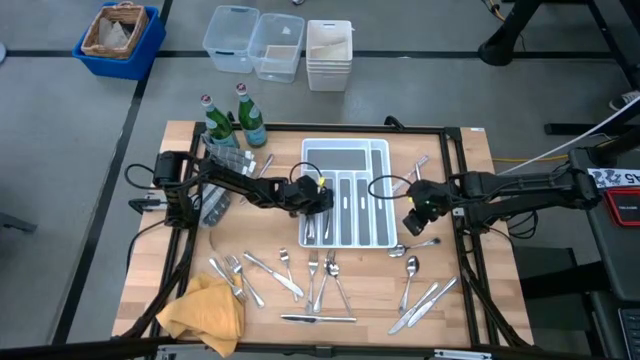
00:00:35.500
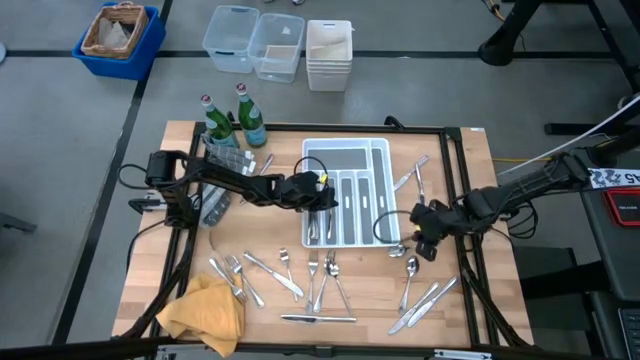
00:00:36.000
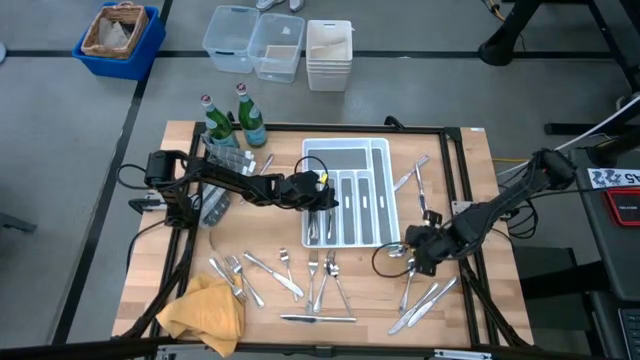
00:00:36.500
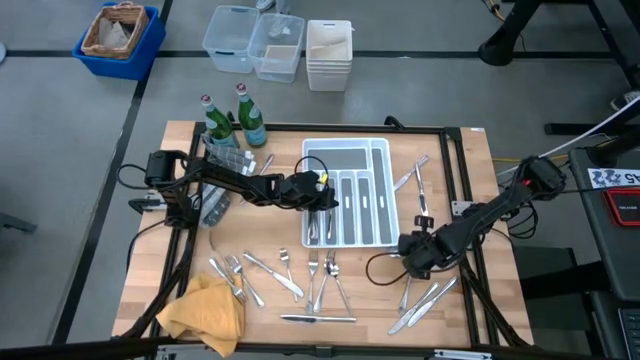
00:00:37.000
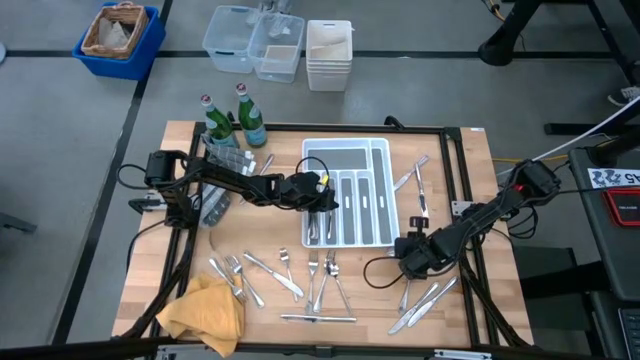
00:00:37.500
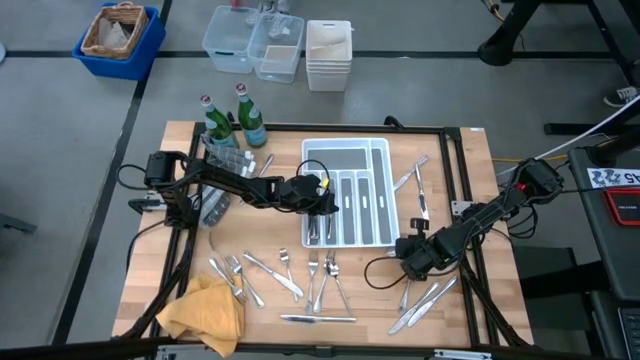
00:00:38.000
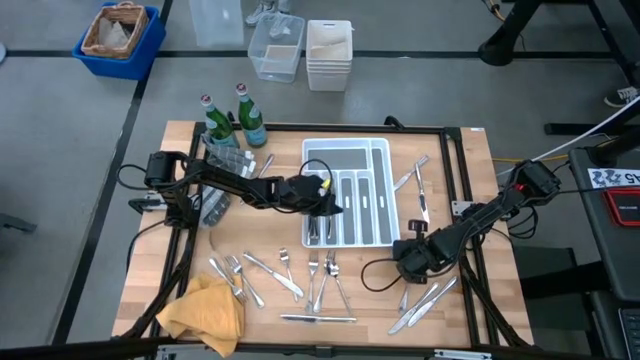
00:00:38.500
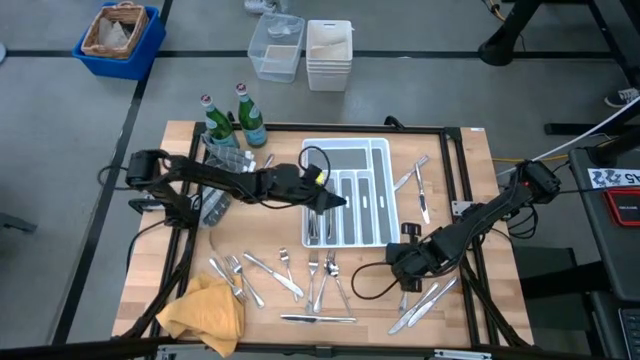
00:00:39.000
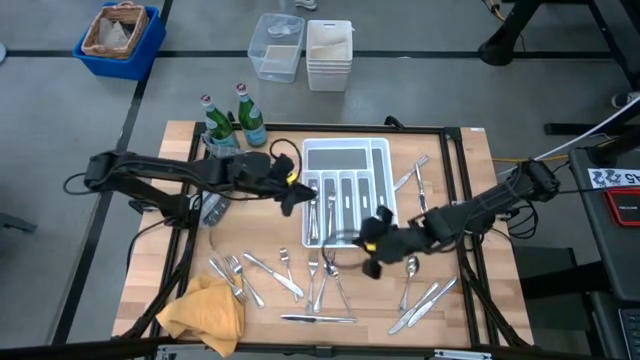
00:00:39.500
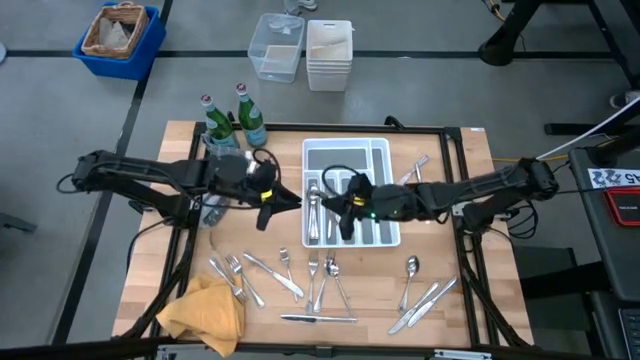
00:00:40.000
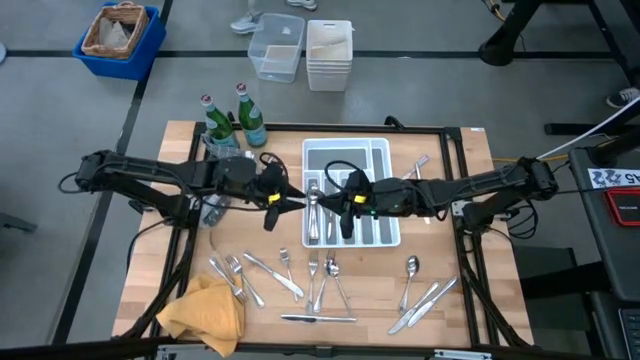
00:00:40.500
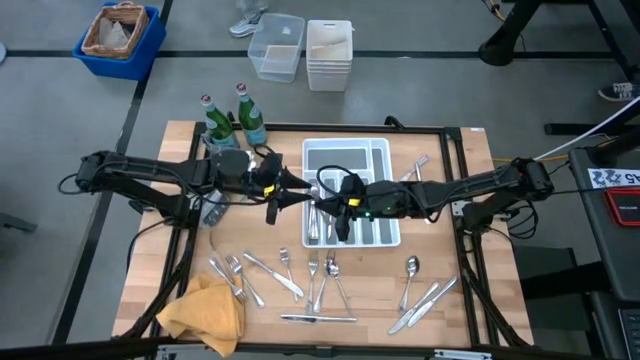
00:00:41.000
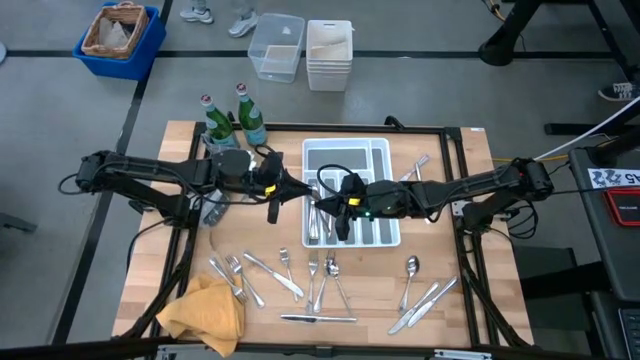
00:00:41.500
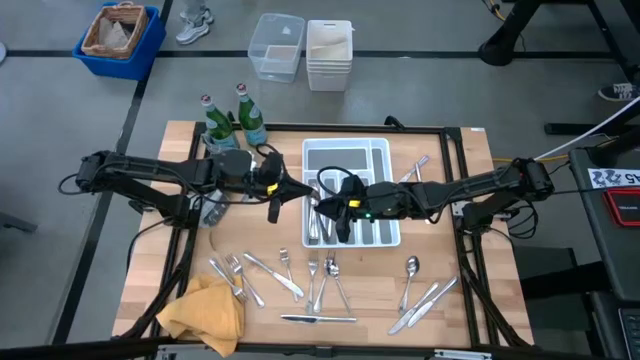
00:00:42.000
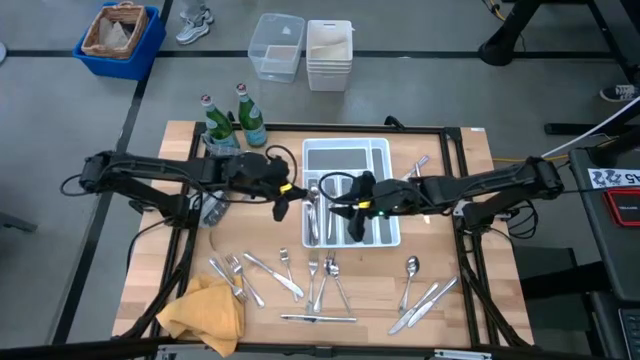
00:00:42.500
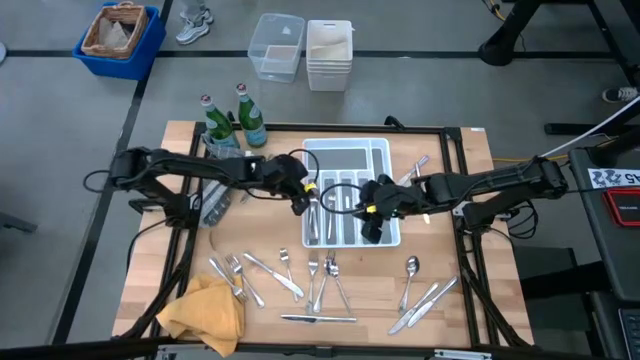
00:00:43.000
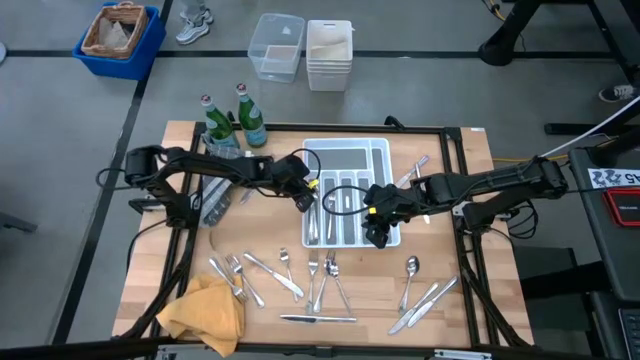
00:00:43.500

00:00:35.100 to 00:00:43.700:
Task: Sort silverware
Put the silver spoon into the silverware tray

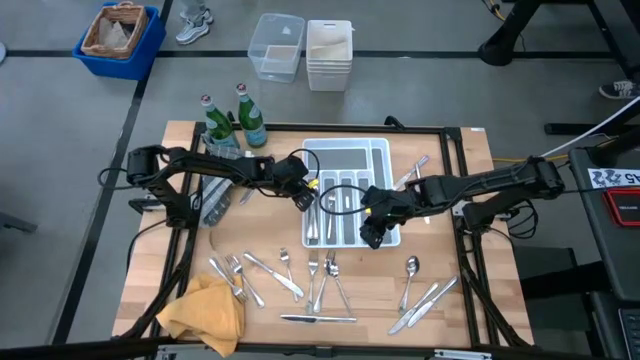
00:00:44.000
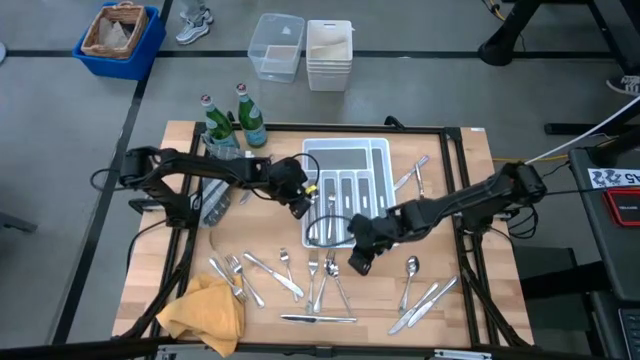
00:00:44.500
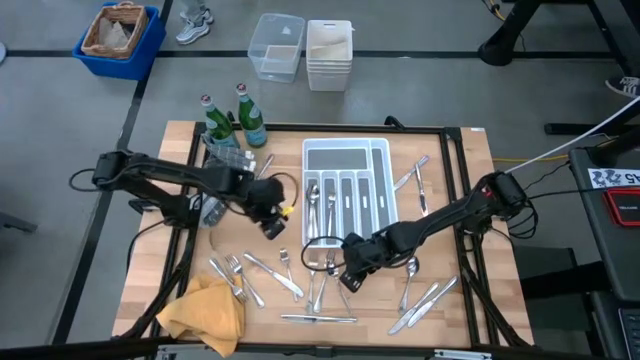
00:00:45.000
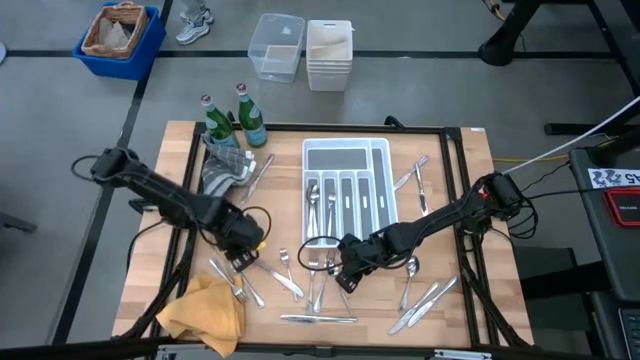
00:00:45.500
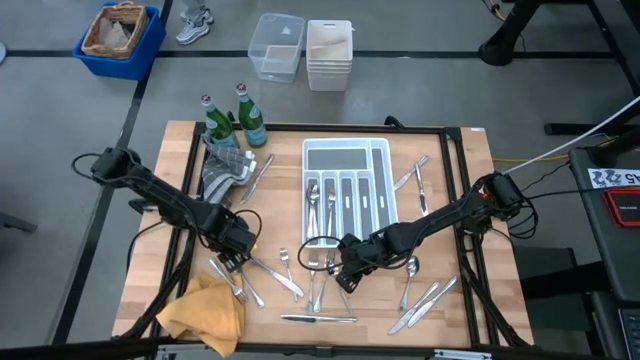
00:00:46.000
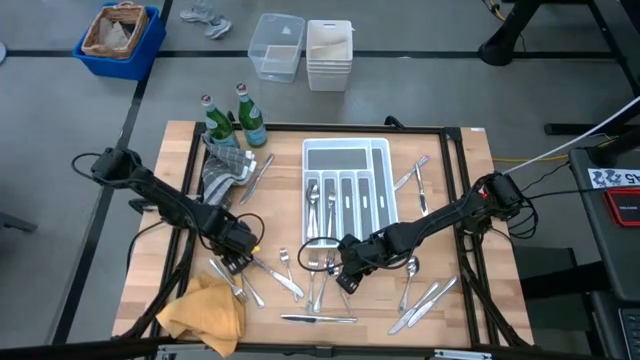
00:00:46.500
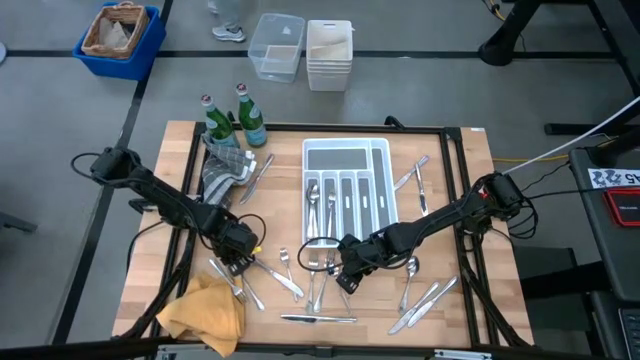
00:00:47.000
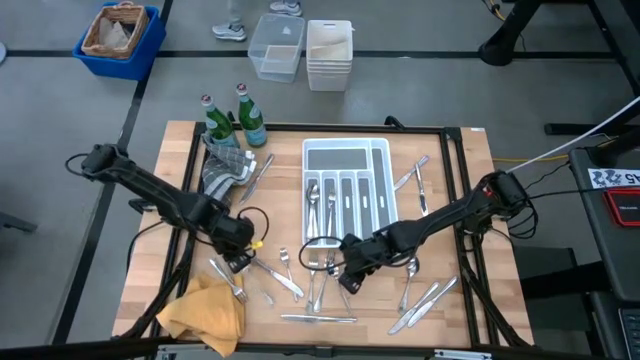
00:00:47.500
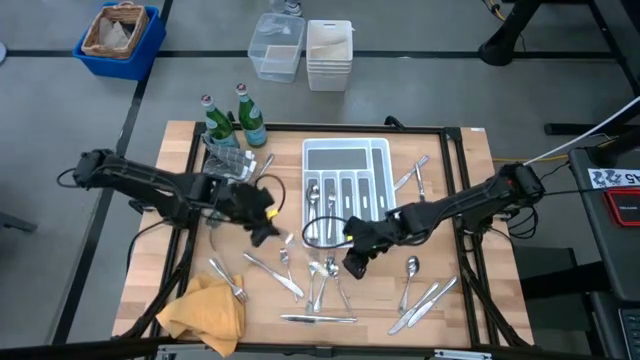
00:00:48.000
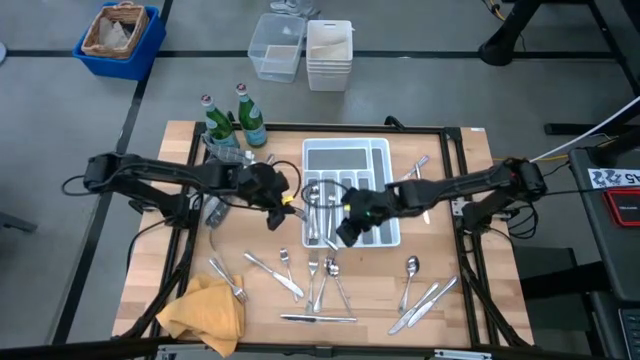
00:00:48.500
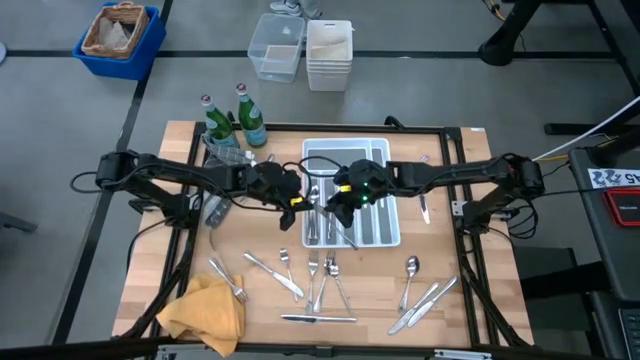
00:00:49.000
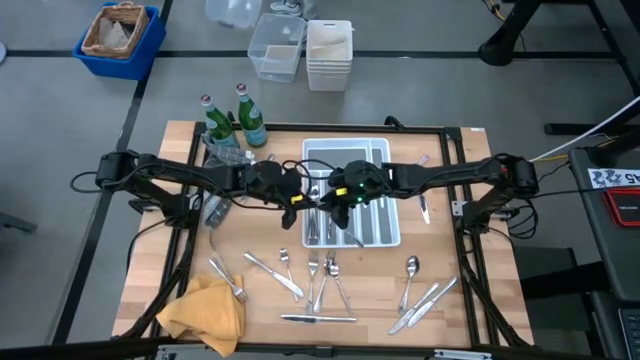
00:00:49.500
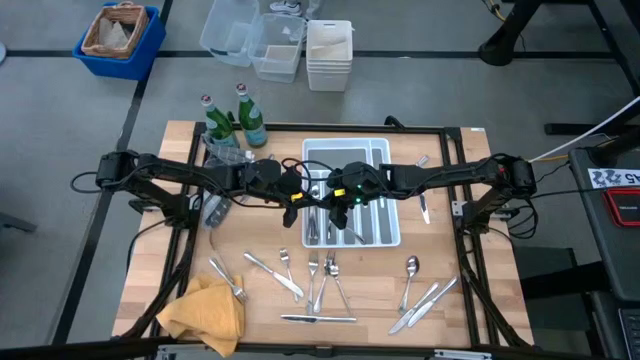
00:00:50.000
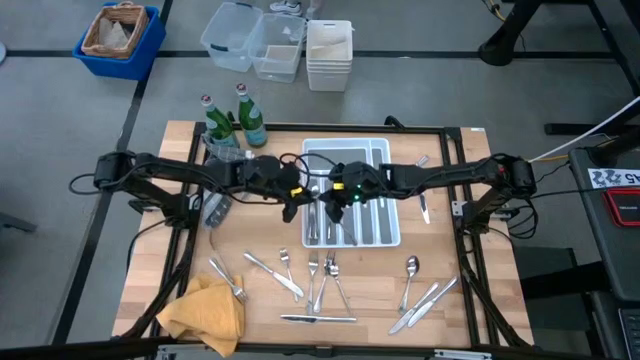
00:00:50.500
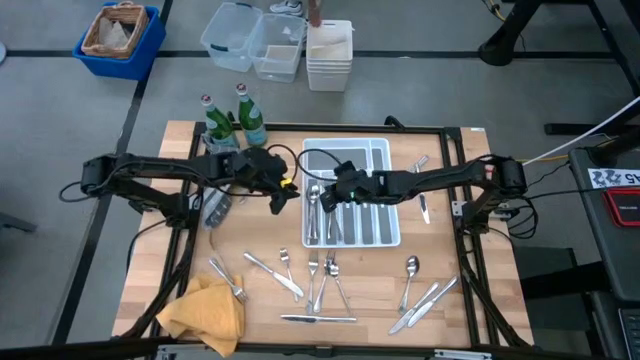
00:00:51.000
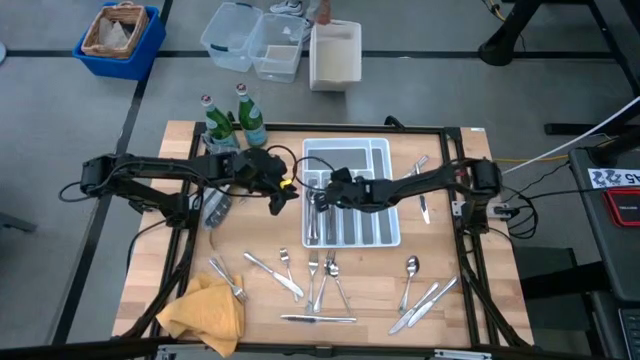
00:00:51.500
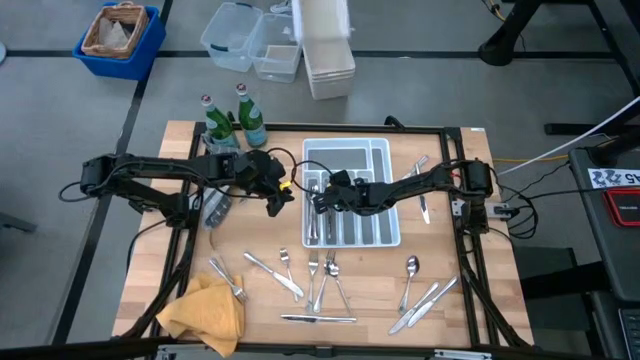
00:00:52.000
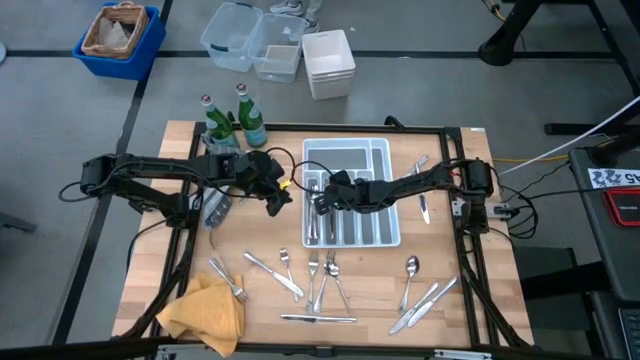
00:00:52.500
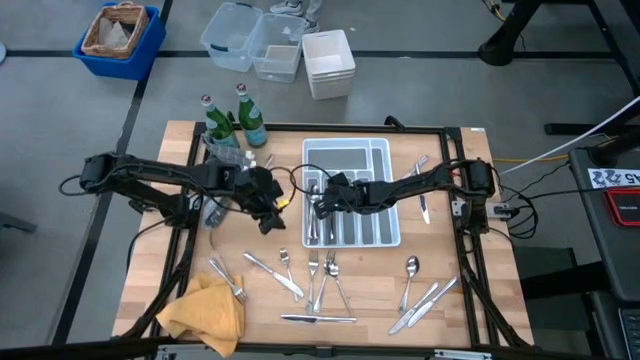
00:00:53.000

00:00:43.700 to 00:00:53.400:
Put the silver fork into the silverware tray

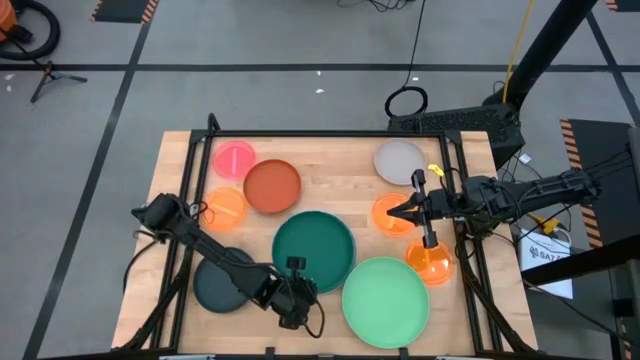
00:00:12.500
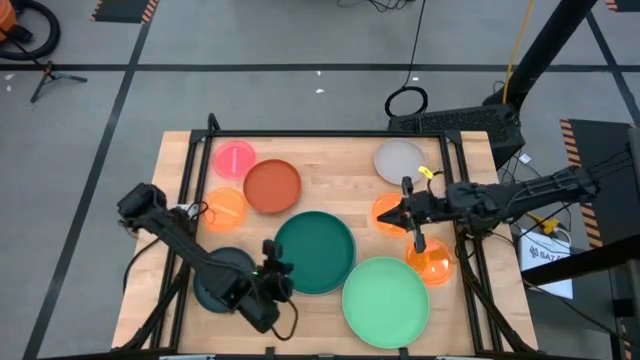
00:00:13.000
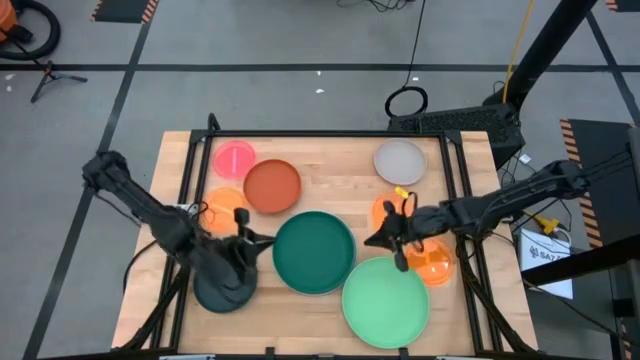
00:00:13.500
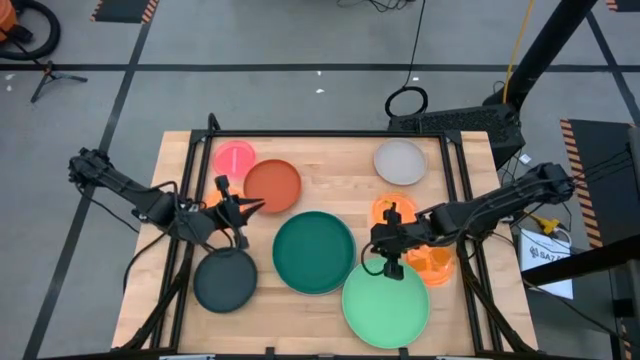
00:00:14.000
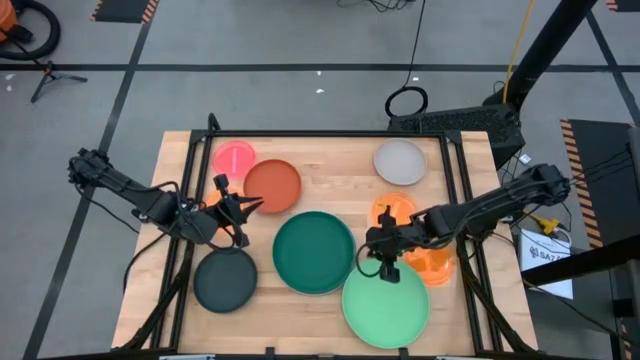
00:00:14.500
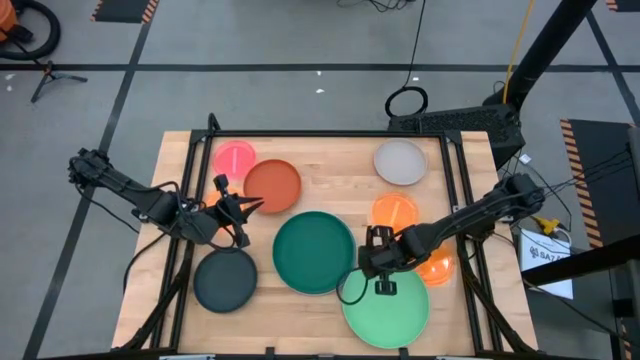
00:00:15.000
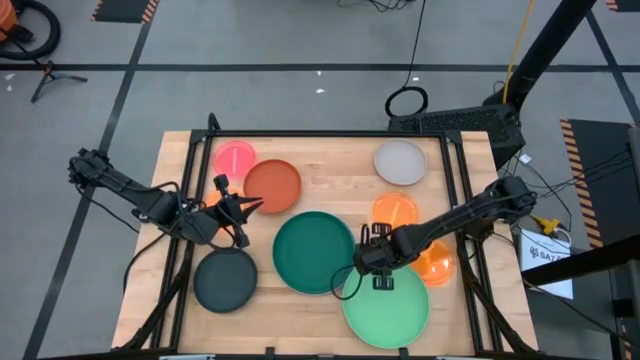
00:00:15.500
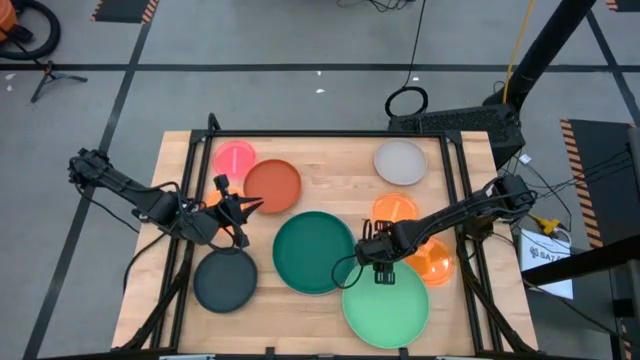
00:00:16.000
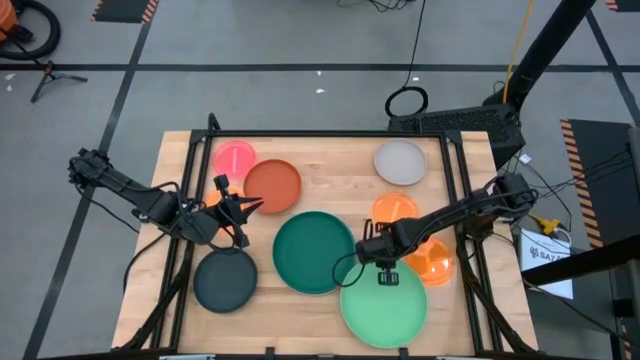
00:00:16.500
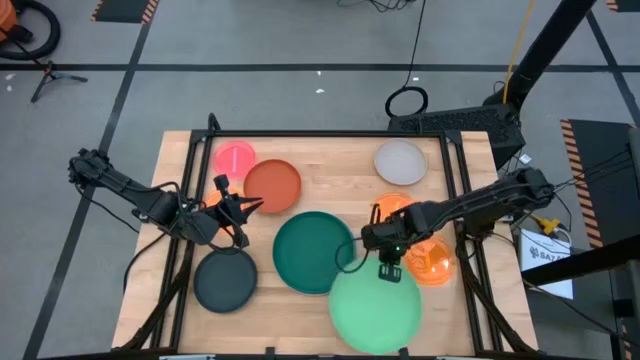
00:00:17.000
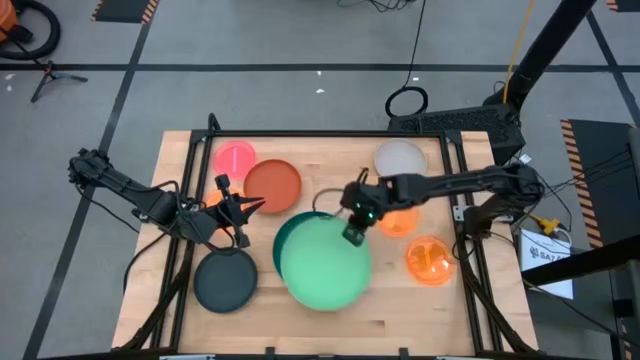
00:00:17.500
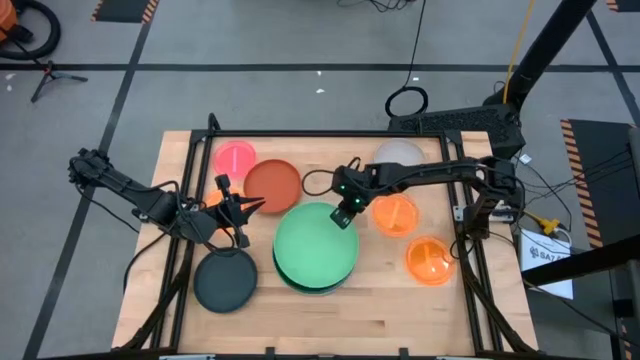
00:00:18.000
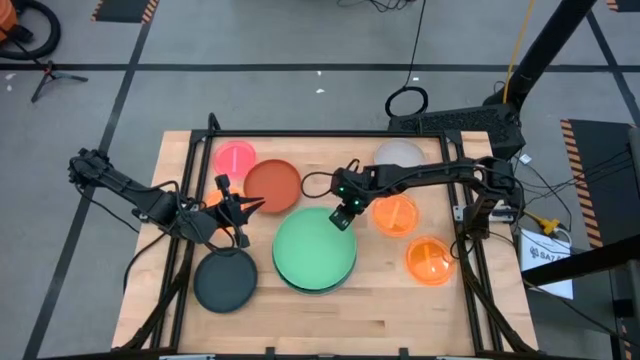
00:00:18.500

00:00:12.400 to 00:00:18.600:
Task: Stack plastic plates
Stack the green plate on the dark green plate
